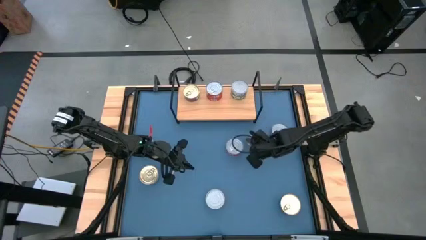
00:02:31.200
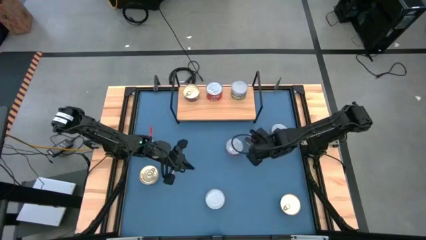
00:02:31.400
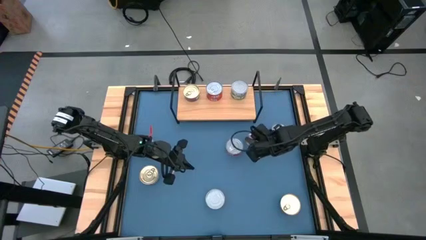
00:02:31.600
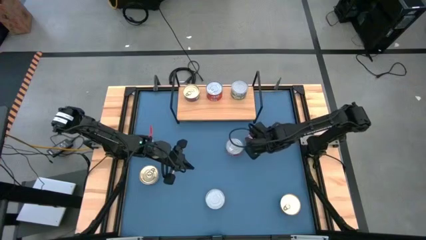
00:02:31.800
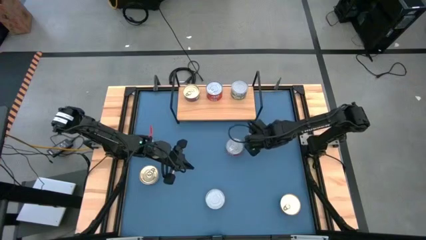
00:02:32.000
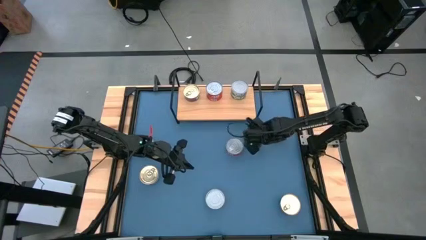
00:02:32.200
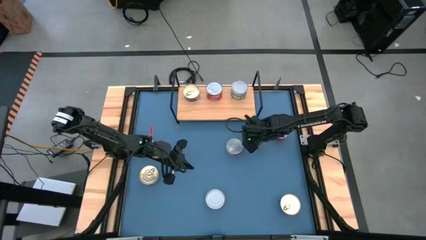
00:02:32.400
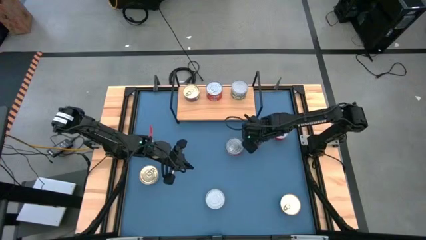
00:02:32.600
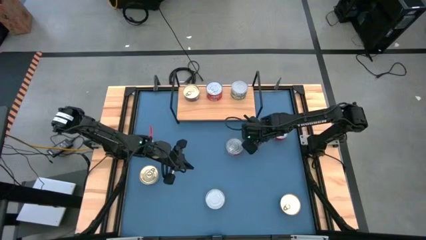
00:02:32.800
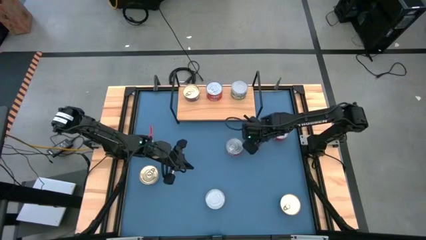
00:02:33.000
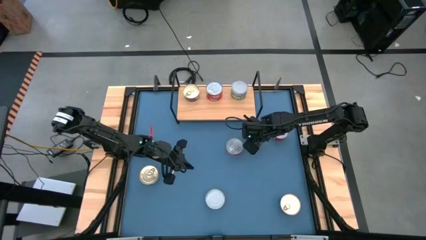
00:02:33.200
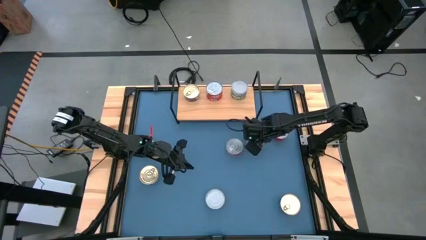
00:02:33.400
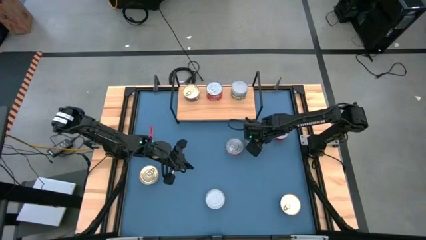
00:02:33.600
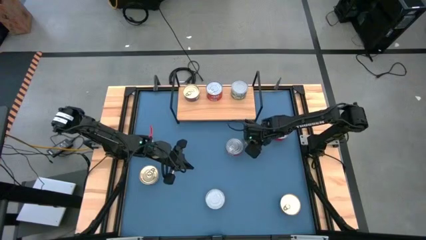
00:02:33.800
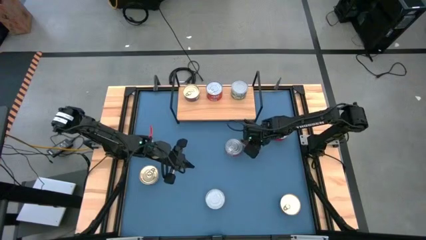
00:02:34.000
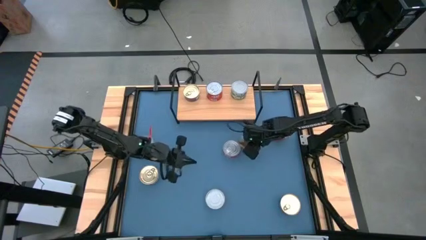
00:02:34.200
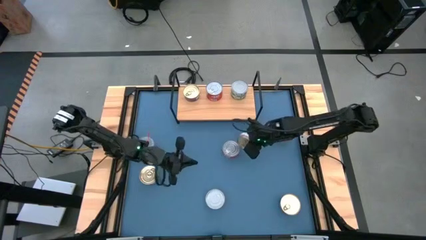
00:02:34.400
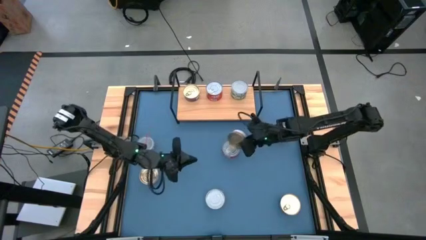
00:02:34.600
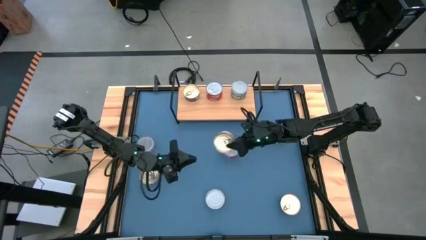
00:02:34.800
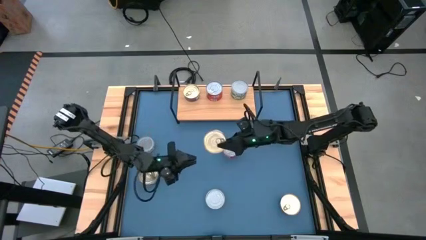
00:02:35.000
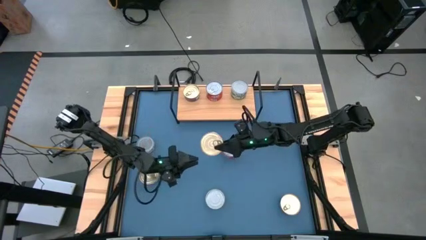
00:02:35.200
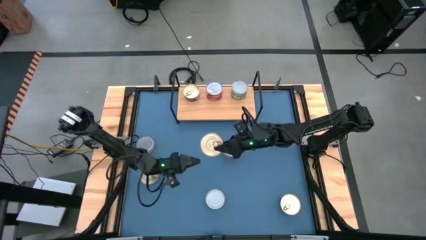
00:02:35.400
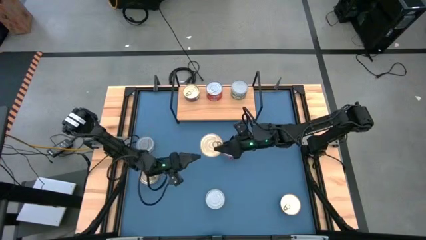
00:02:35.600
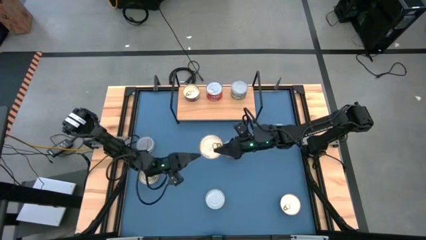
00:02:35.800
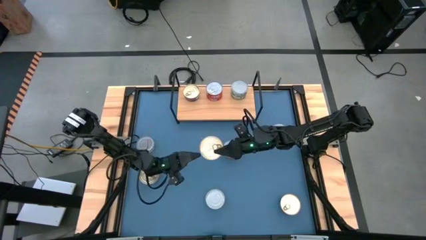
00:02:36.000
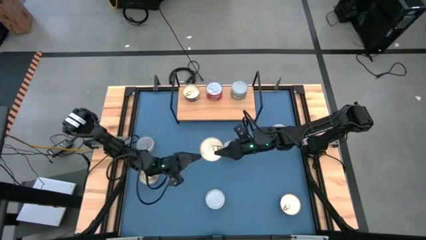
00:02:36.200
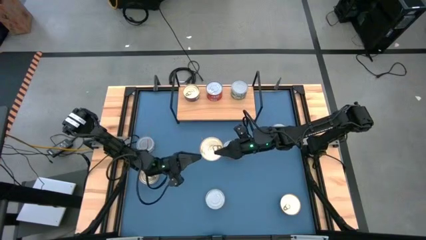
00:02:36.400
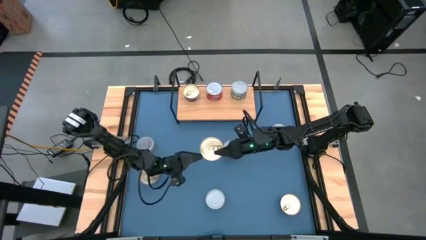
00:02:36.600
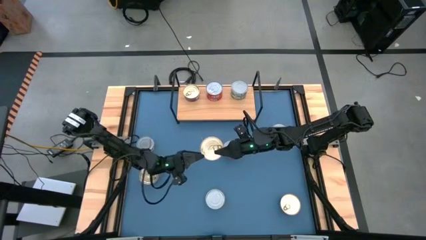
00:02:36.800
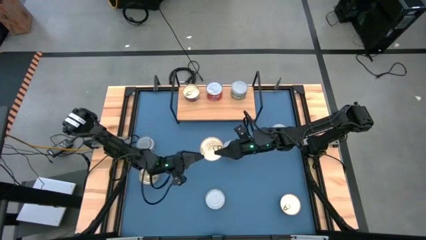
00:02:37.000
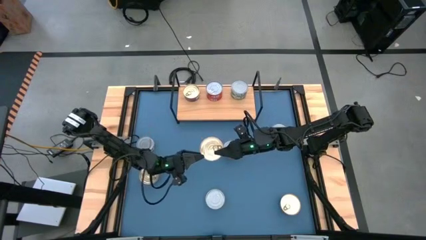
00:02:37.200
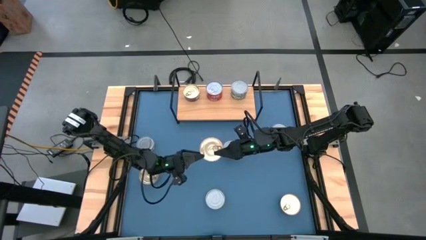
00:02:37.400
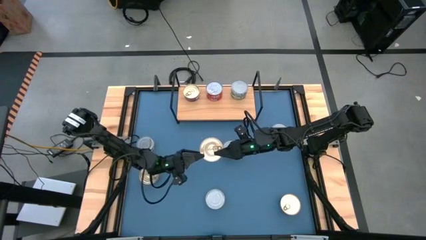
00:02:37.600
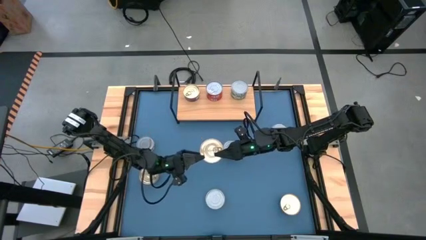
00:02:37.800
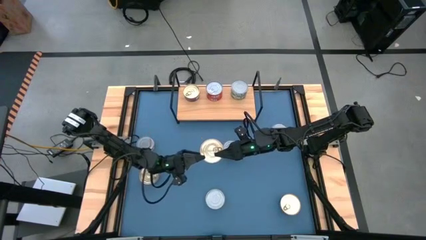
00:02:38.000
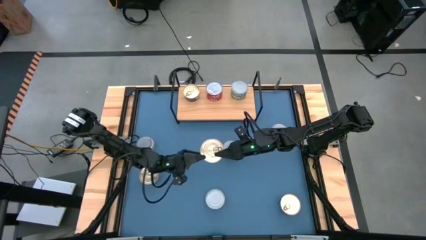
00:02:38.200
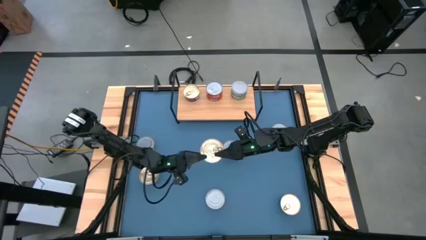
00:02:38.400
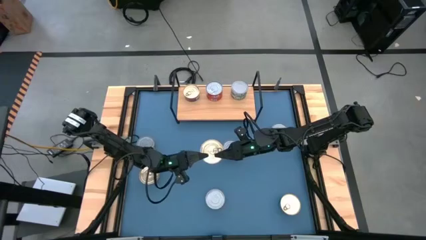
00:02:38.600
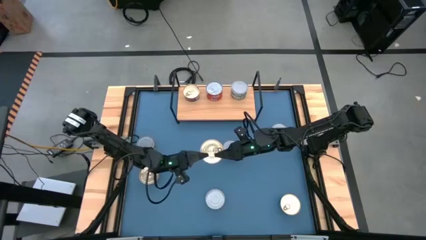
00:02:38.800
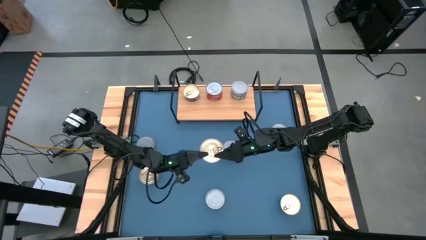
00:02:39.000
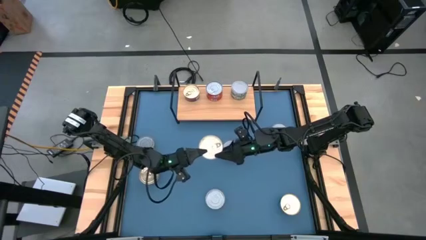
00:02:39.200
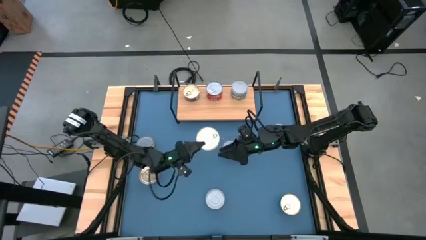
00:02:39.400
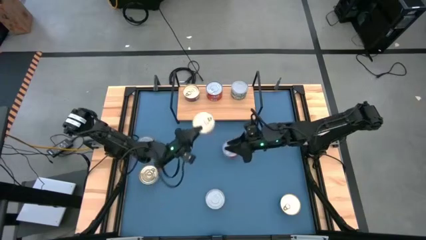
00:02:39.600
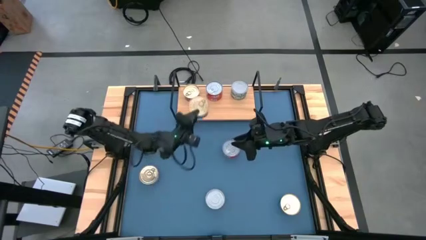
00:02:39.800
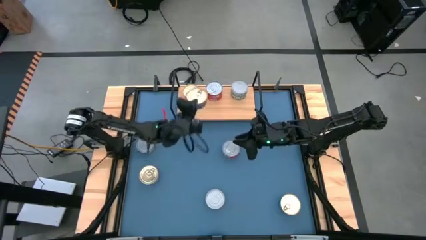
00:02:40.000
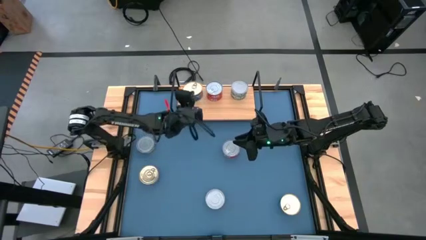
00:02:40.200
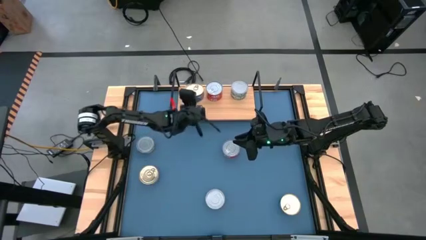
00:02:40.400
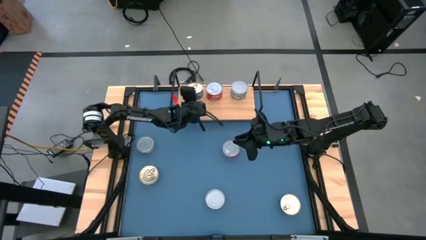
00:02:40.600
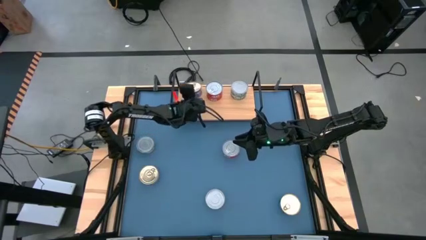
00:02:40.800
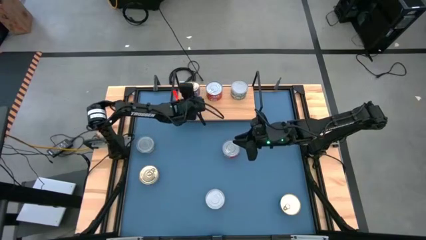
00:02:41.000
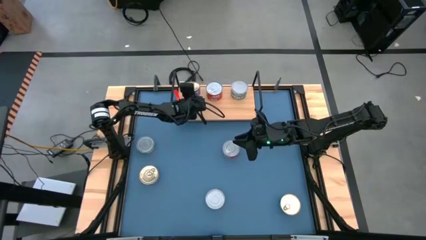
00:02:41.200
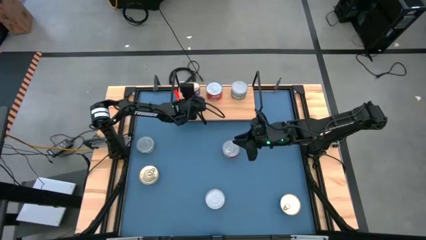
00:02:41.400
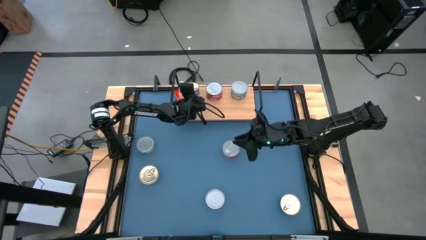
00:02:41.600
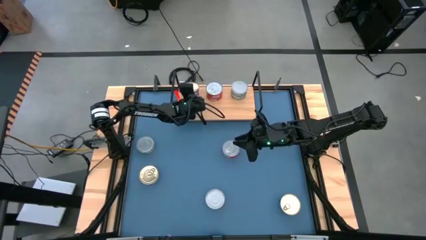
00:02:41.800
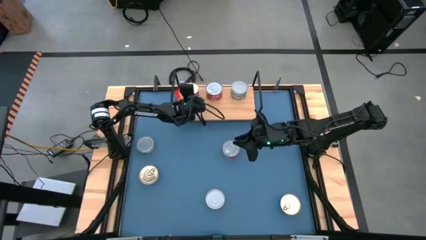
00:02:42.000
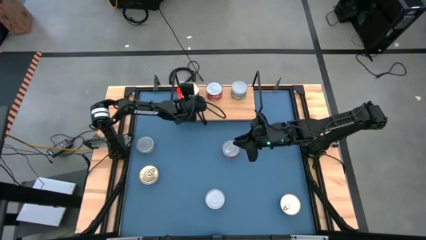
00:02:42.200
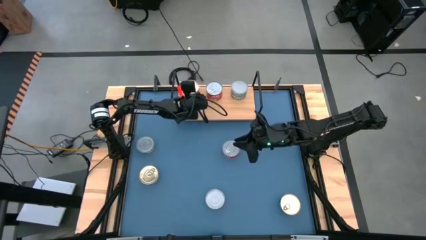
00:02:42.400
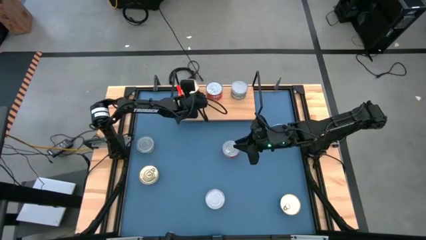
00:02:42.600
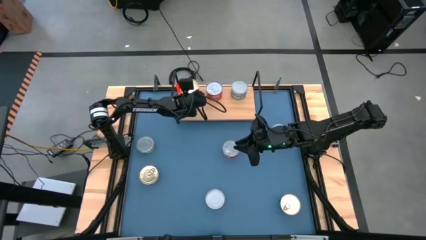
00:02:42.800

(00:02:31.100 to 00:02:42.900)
Task: Stack canned seafood by type on shelf
Stack the blue tuna can on top of the other blue tuna can on the shelf

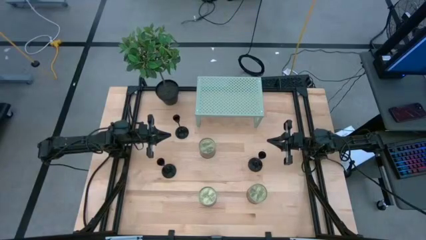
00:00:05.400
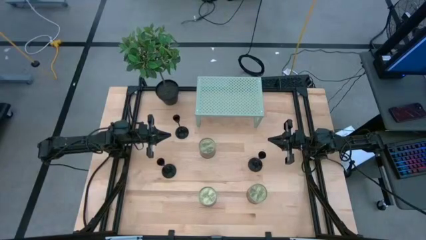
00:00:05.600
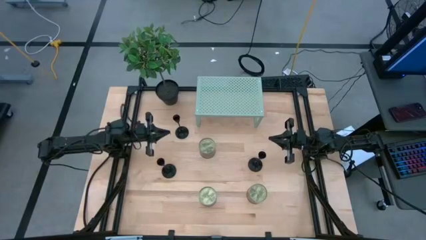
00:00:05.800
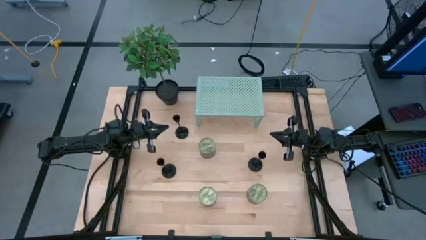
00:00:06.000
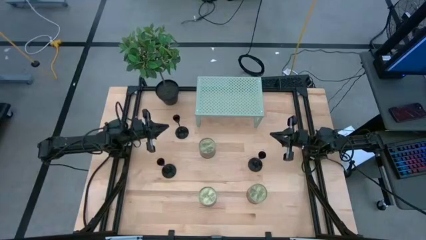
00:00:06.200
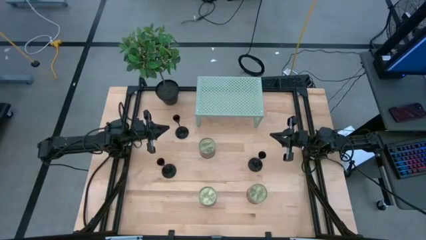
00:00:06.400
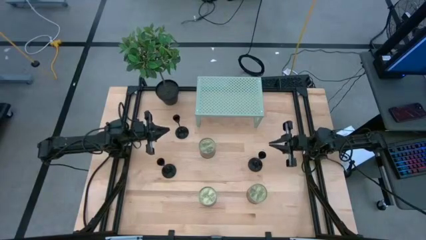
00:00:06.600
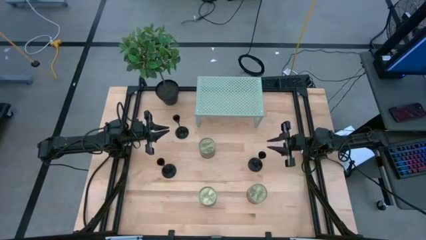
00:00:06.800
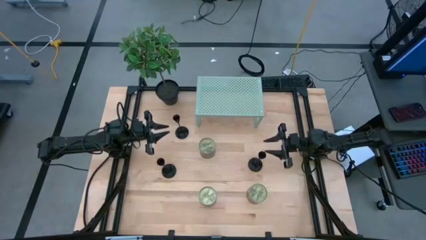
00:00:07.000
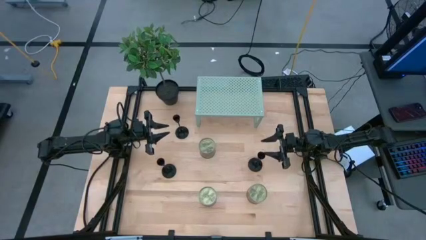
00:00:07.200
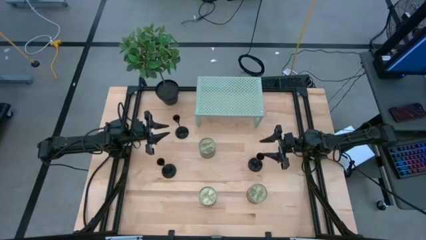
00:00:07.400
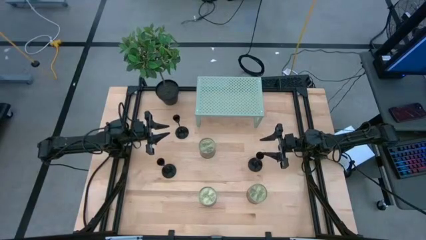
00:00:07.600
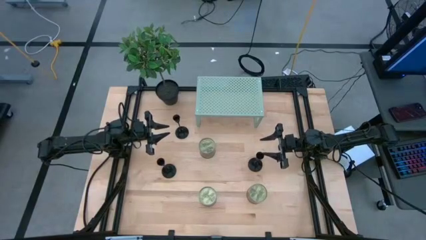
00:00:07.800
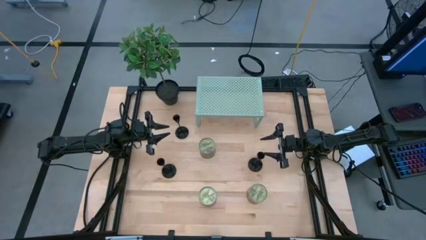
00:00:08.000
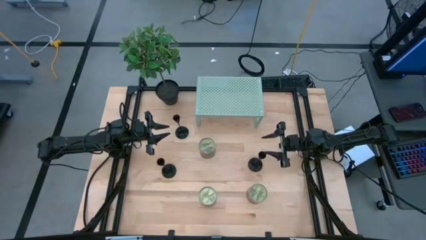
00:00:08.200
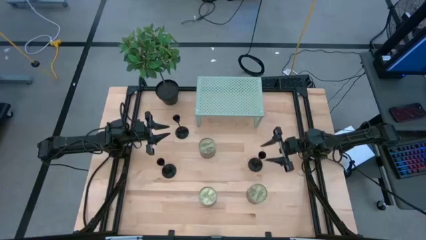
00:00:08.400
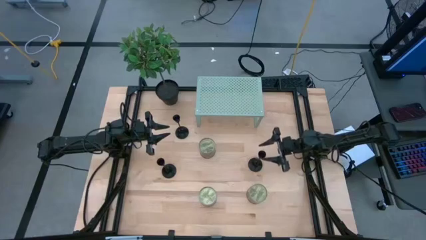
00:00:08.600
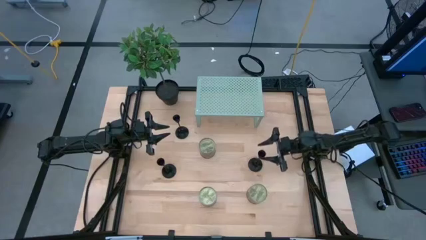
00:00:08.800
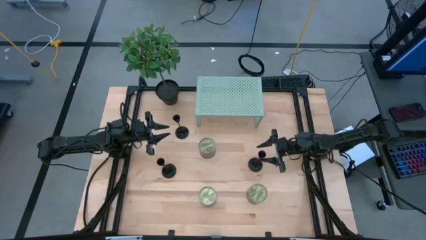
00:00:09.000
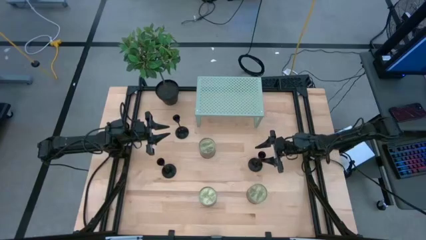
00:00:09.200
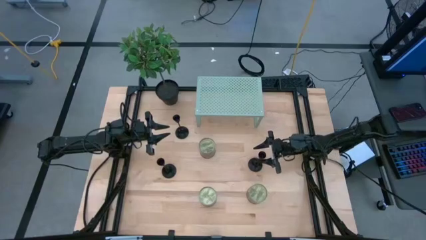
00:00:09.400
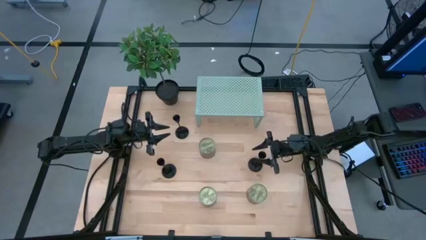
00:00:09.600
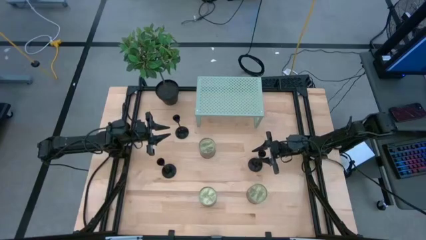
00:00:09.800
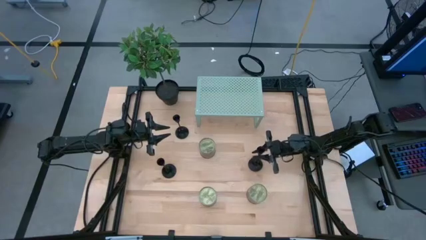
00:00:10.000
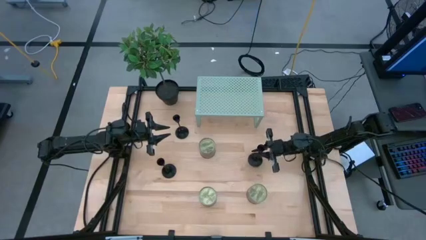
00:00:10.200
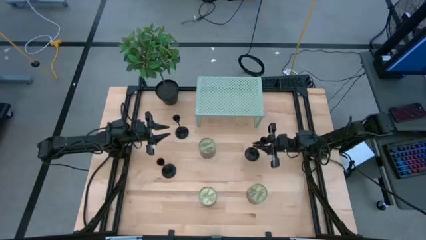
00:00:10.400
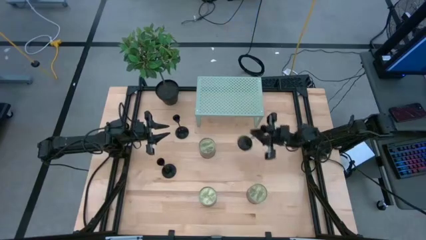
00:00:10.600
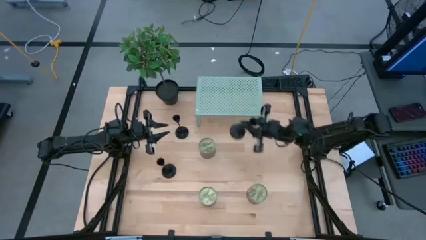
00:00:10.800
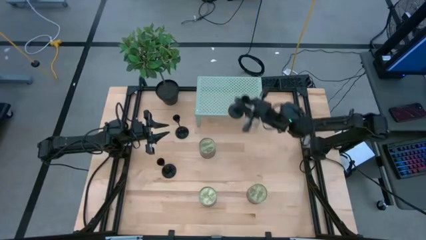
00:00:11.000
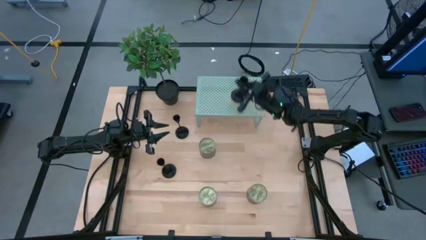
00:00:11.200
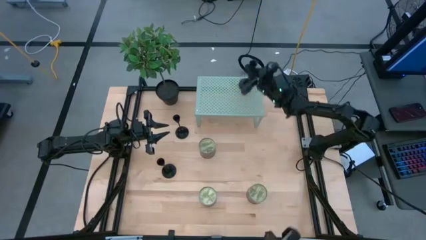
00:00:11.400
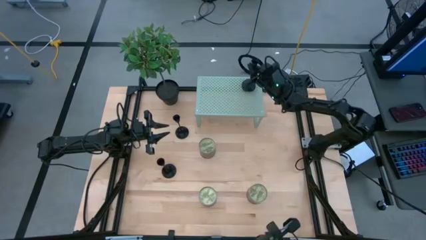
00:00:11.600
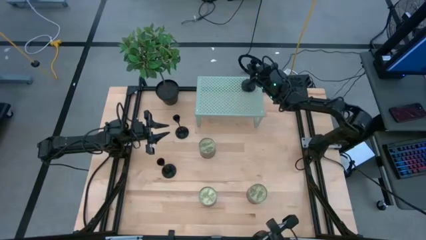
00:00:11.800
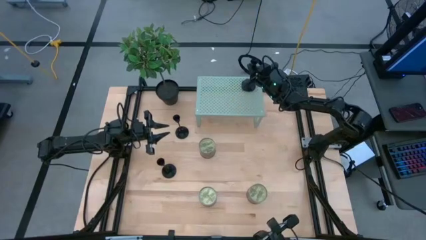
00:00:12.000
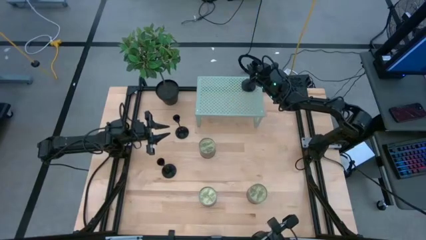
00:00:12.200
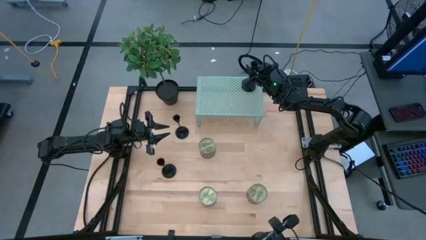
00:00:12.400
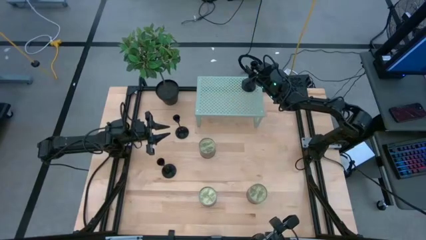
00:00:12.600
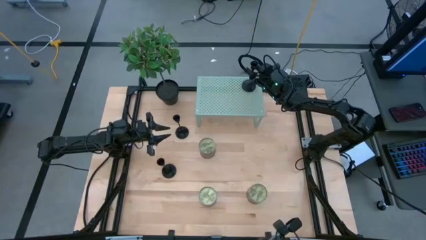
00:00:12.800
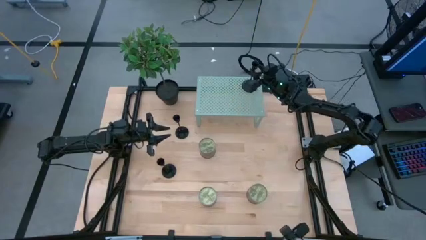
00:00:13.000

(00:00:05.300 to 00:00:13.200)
Task: Pick & Place candle stick holders
Put the bottom right black candle holder on the shelf
